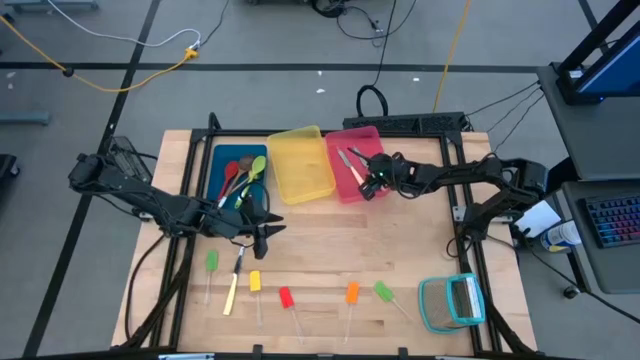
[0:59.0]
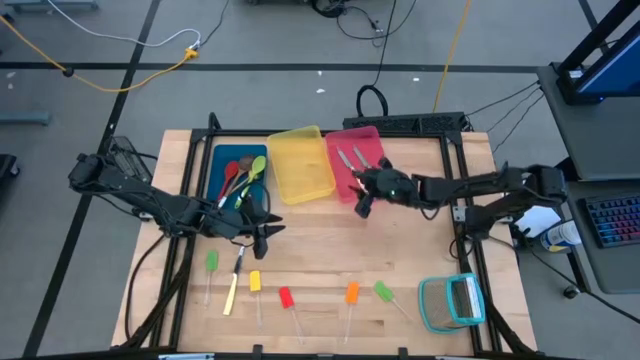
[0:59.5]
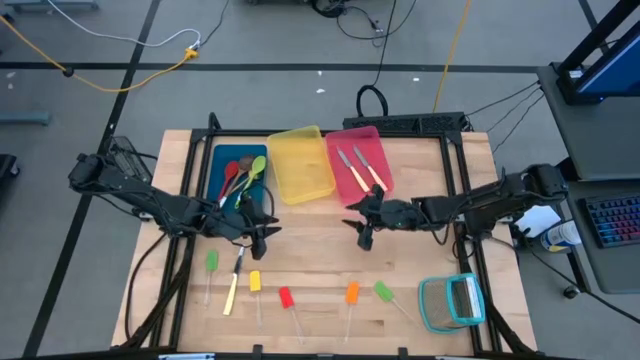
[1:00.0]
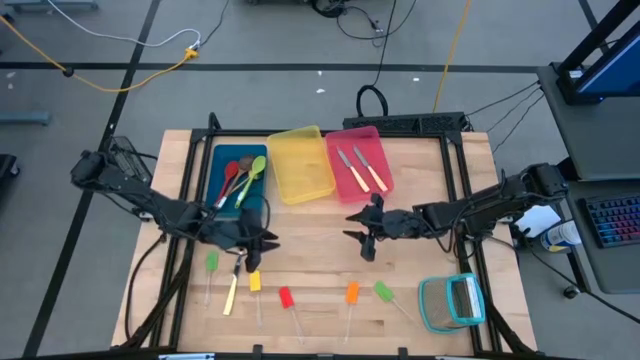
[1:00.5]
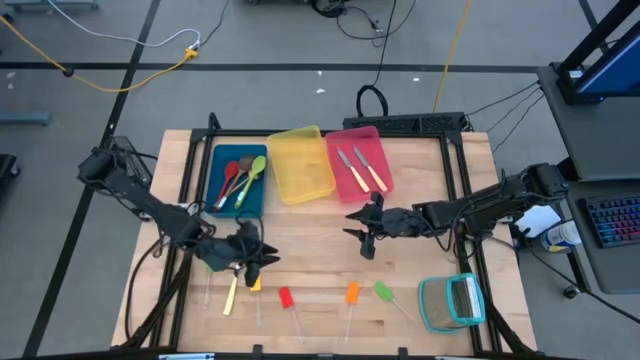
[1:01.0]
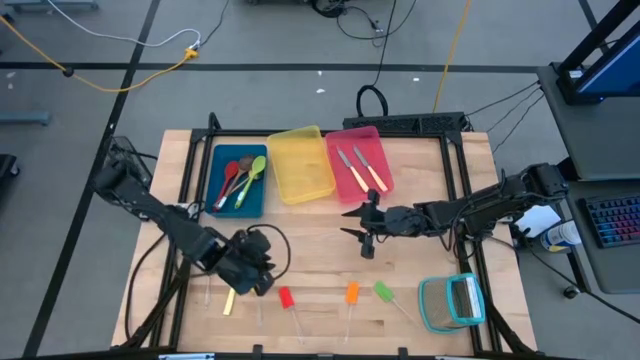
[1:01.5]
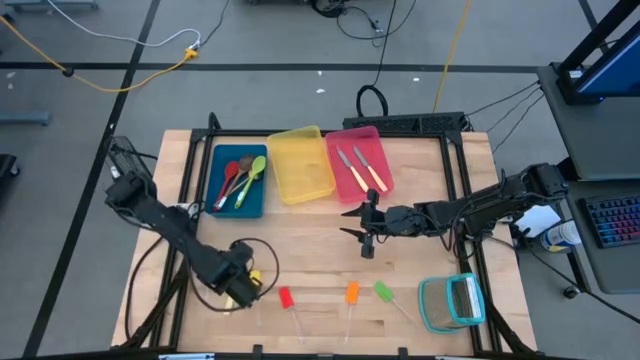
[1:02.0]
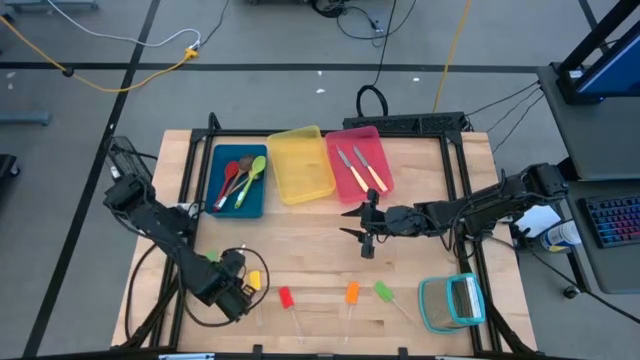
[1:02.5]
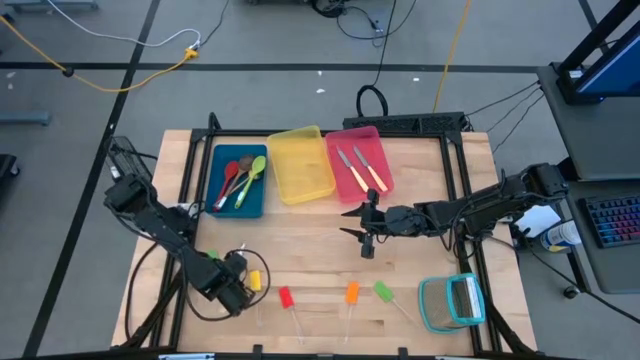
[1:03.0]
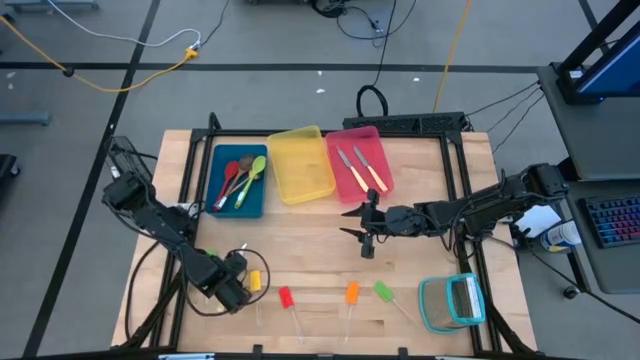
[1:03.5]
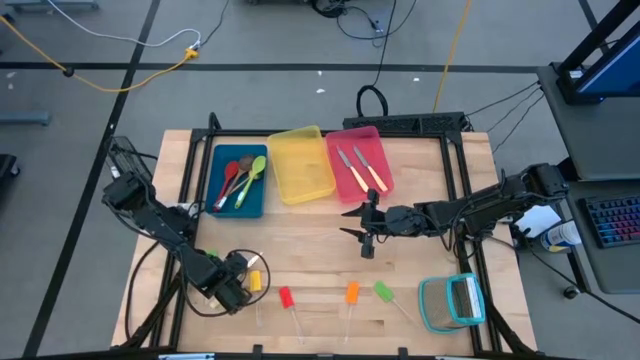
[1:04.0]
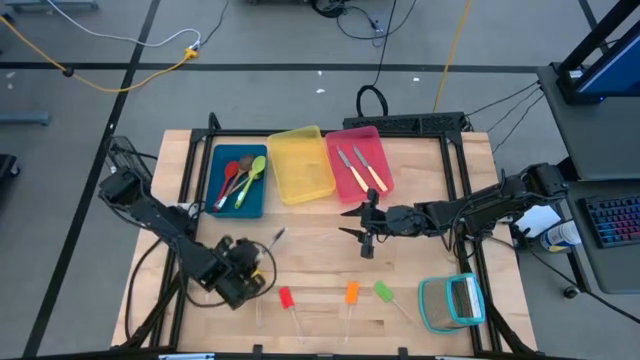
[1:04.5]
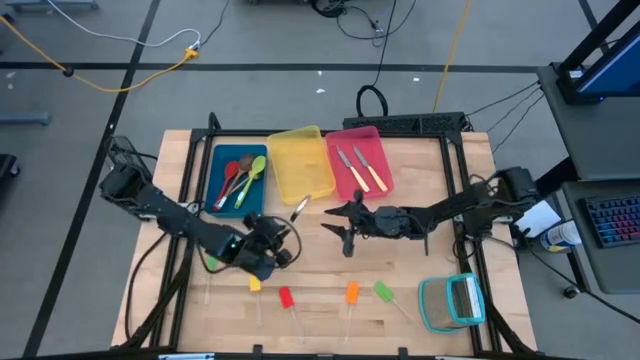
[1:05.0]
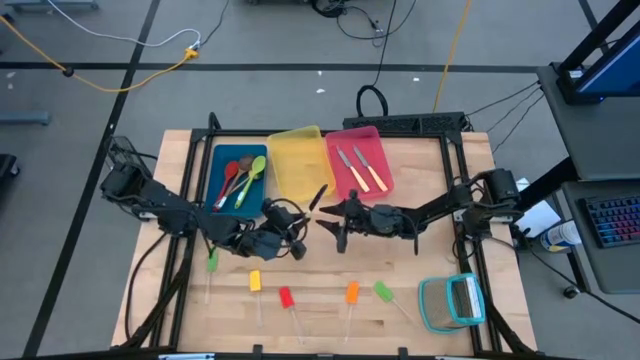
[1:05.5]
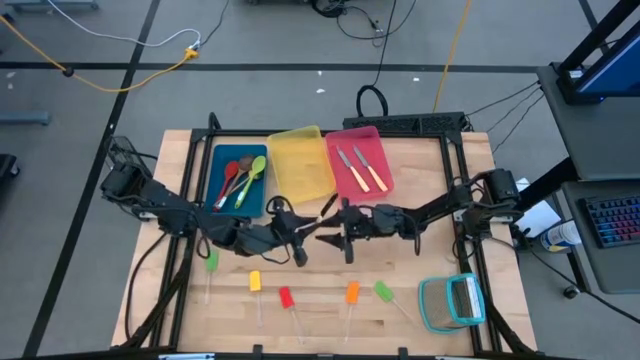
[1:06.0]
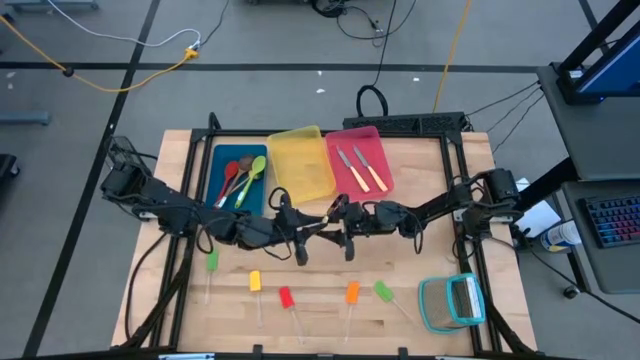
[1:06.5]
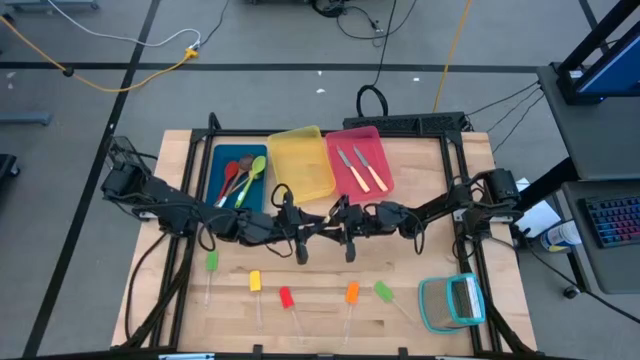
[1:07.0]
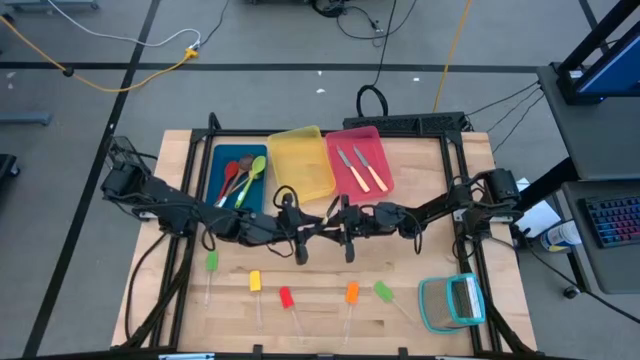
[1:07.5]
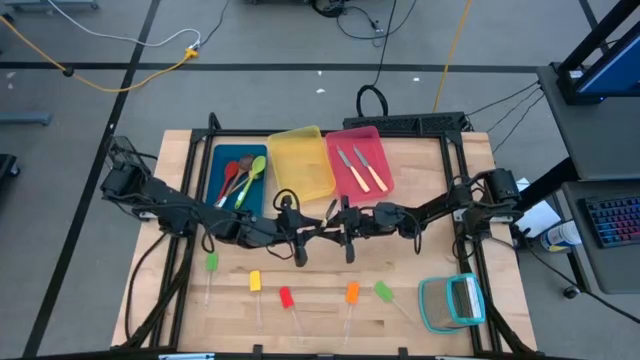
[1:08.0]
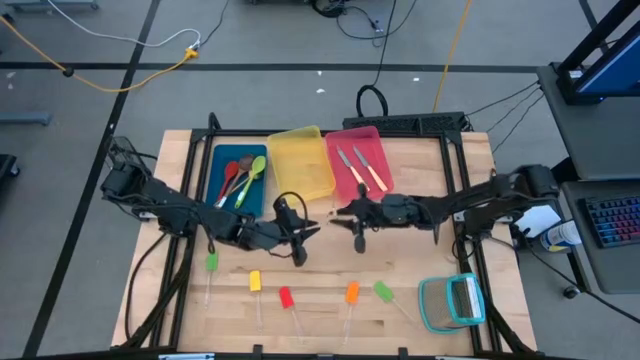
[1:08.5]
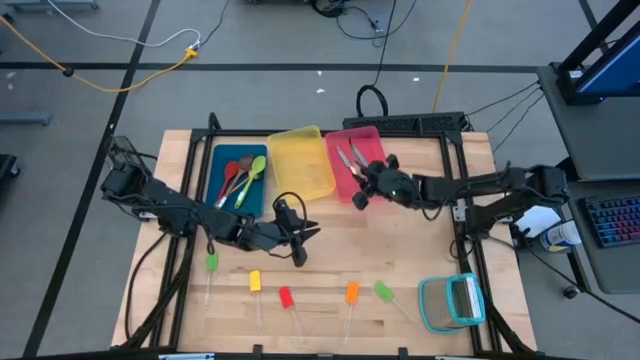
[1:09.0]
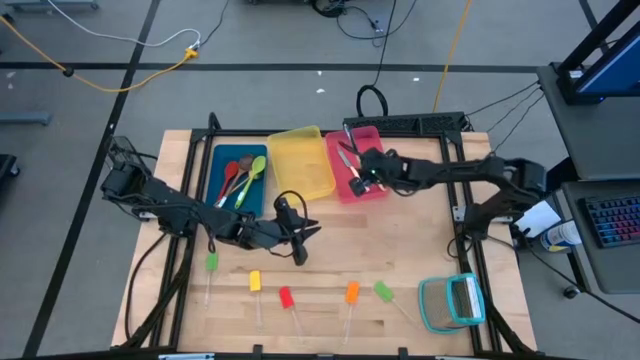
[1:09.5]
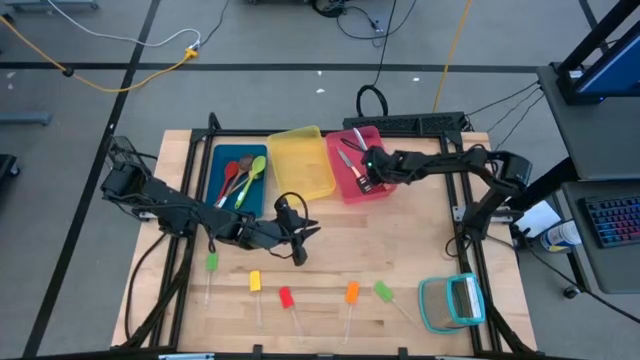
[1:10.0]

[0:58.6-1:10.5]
Task: Pick & Place Kitchen Items
Put the yellow knife into the red bin

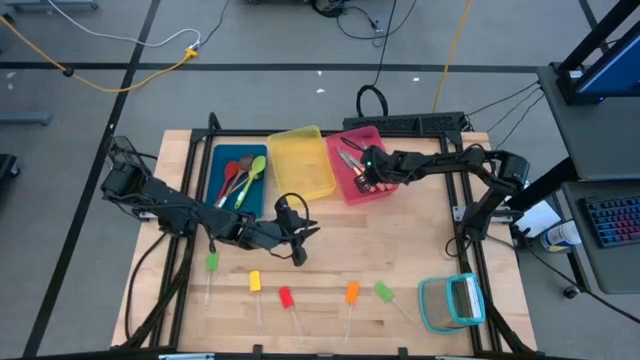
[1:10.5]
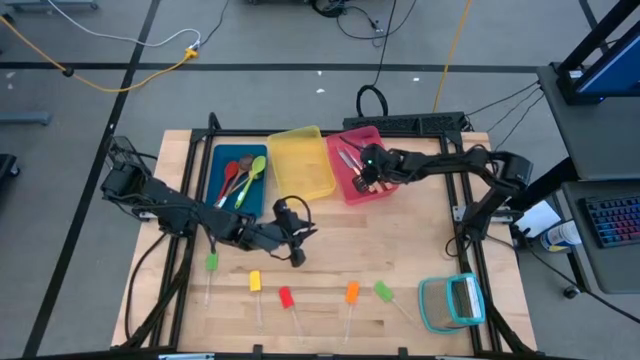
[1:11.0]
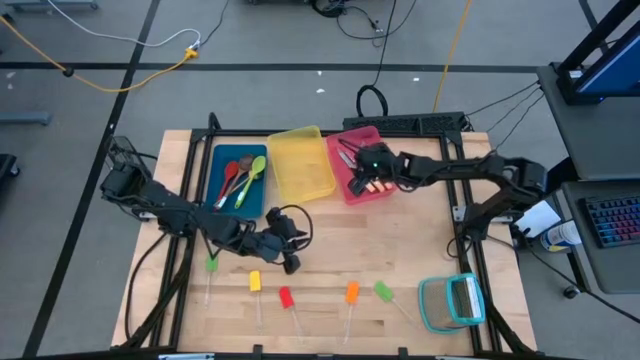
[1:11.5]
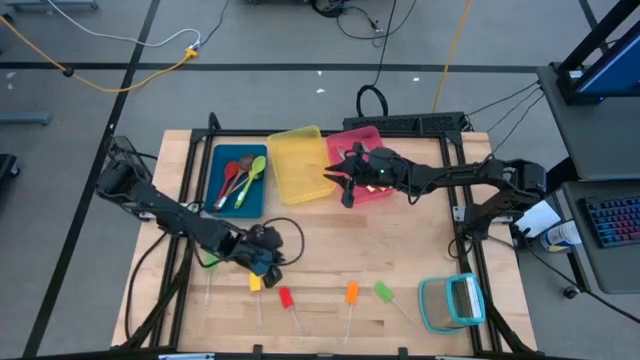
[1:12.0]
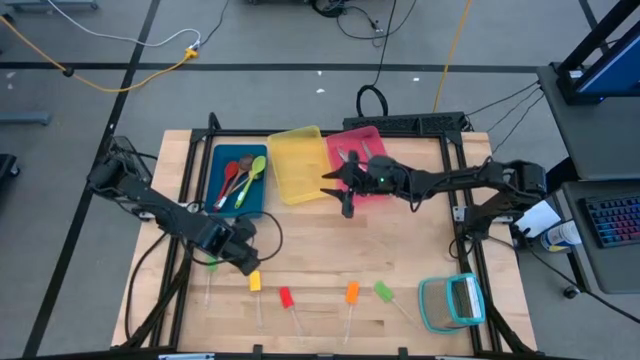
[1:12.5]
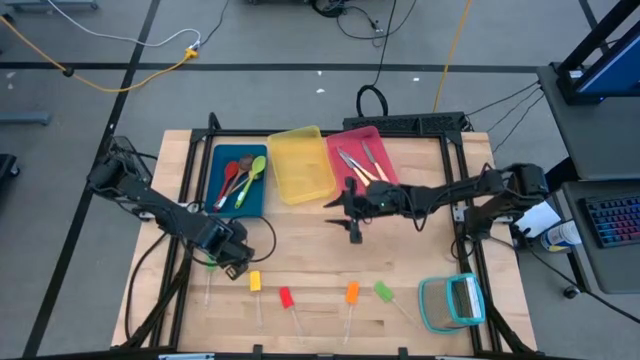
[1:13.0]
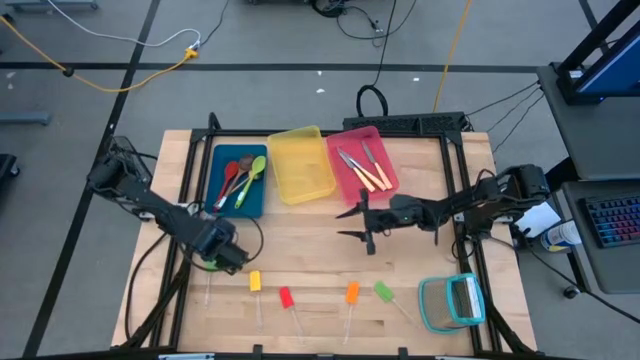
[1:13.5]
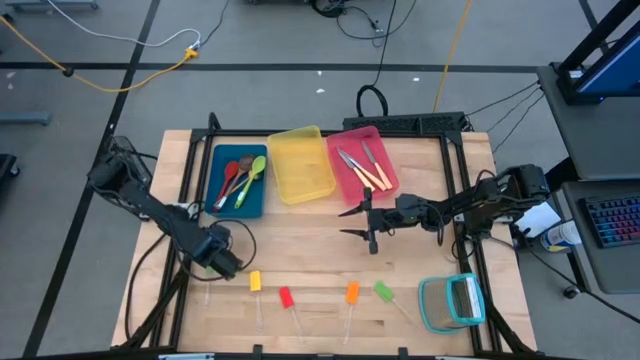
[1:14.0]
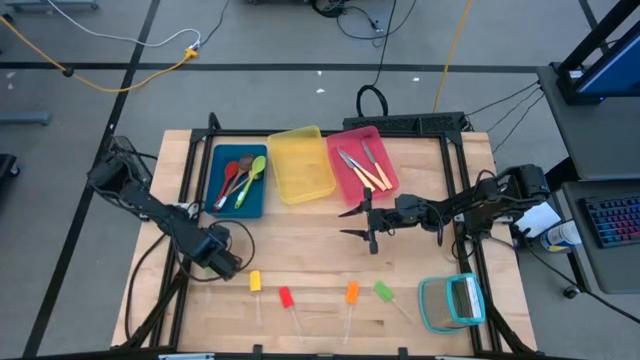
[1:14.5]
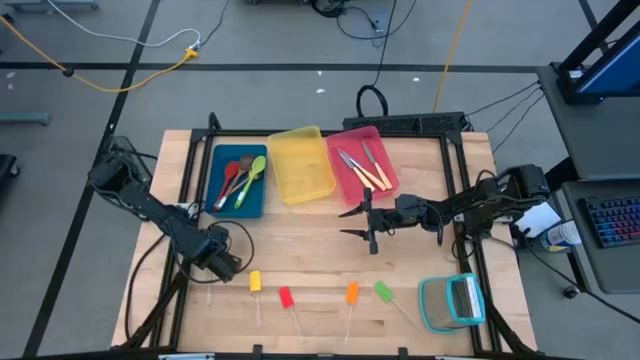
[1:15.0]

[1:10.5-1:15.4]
Put the left green spatula into the yellow bin

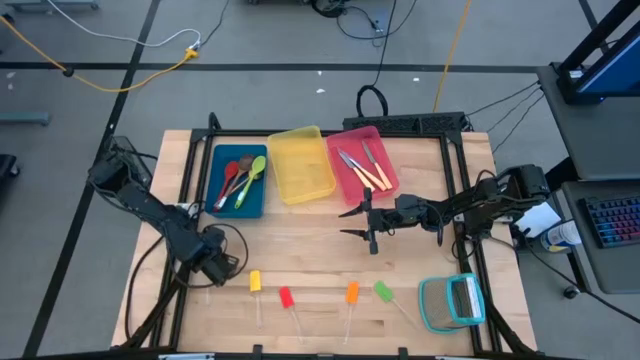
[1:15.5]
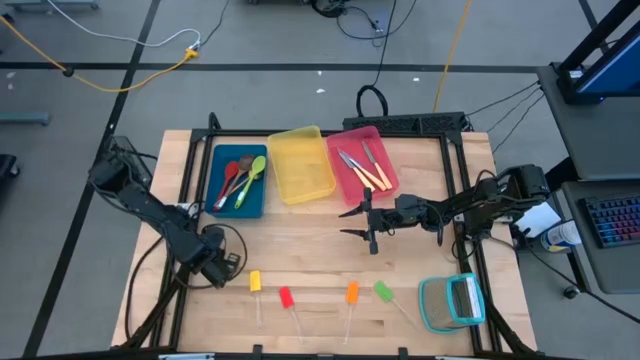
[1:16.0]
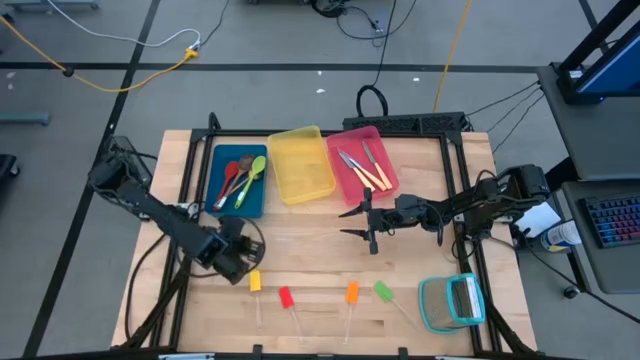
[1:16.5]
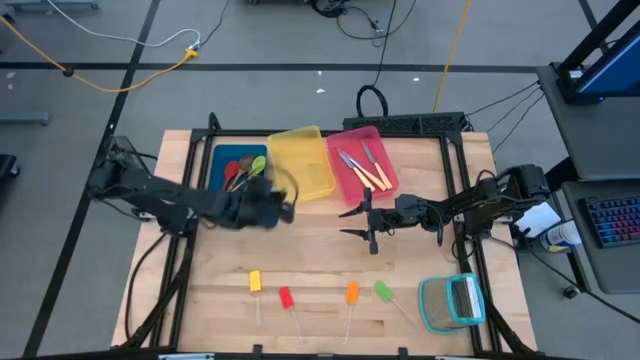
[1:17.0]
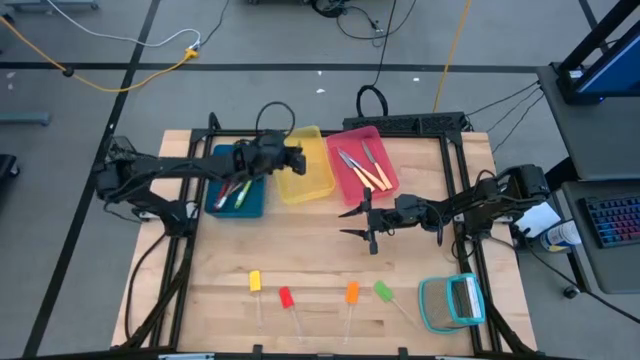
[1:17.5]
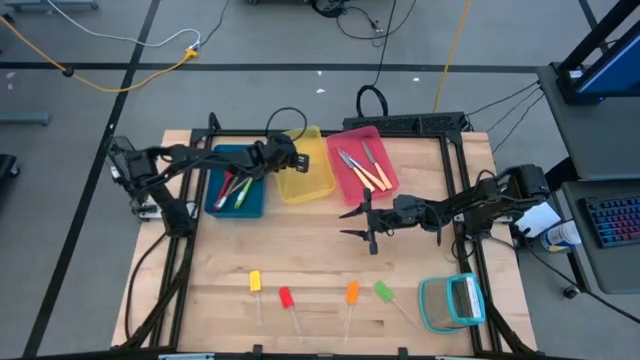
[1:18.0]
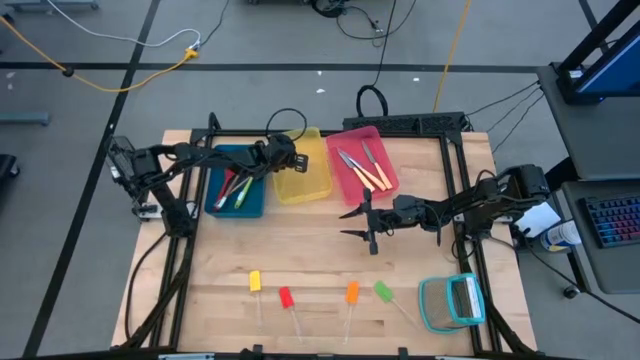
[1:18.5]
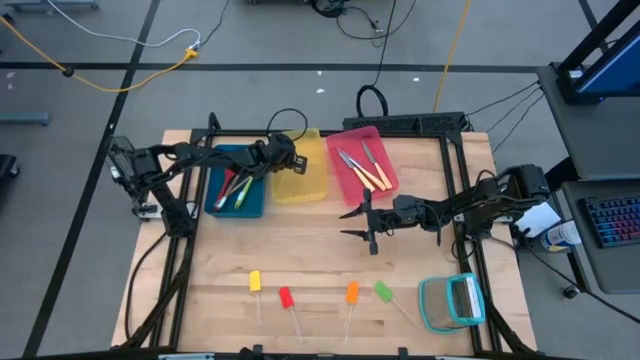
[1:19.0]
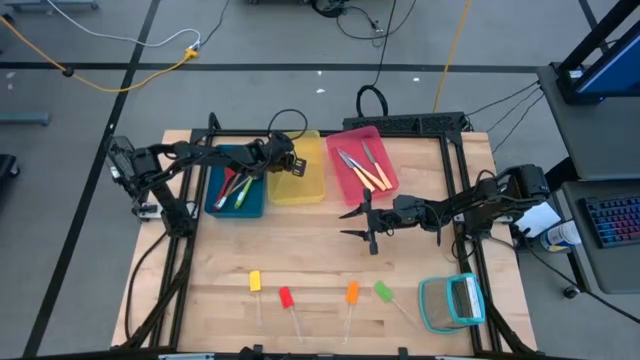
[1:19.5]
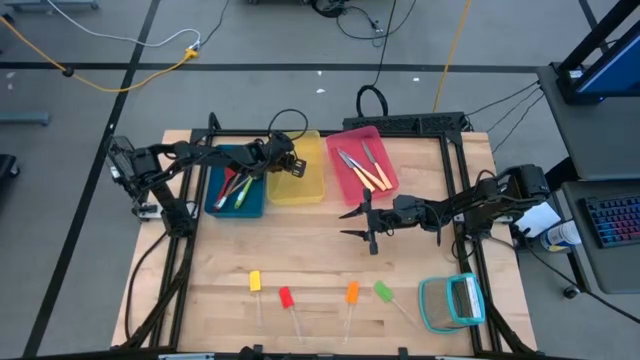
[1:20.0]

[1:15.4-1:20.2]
Put the left green spatula into the yellow bin
